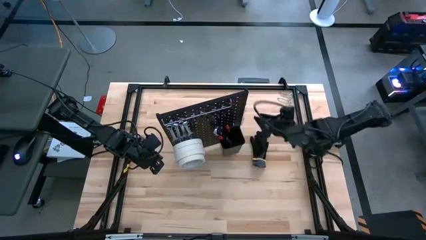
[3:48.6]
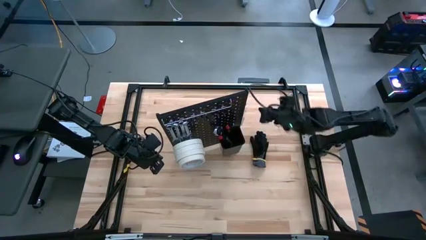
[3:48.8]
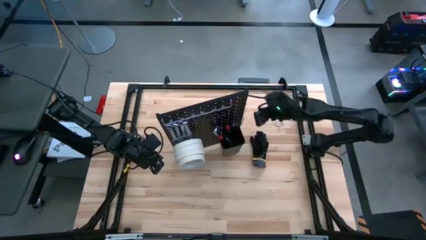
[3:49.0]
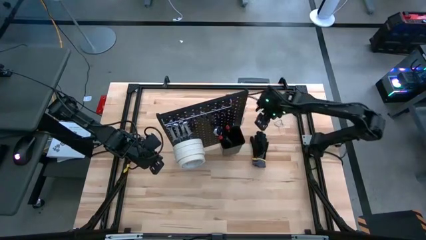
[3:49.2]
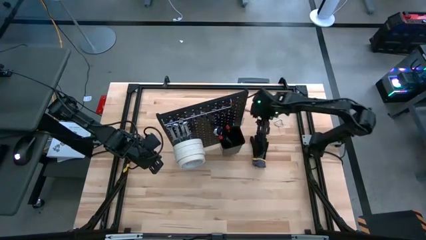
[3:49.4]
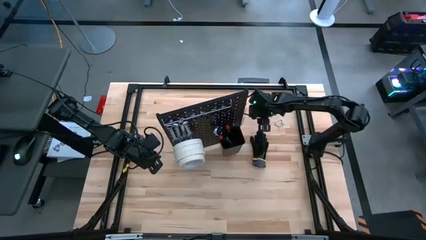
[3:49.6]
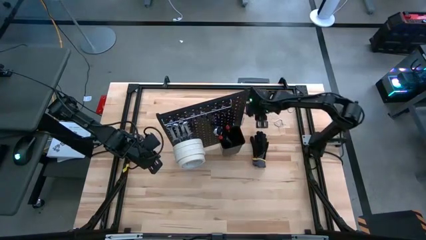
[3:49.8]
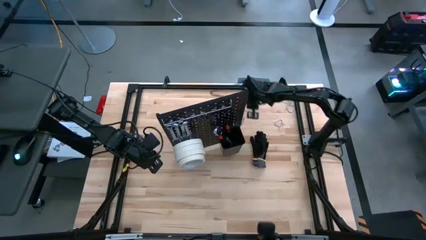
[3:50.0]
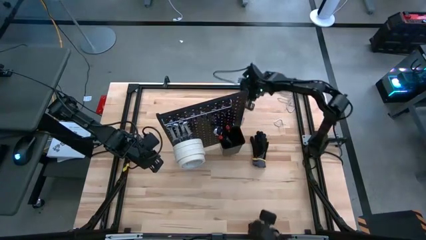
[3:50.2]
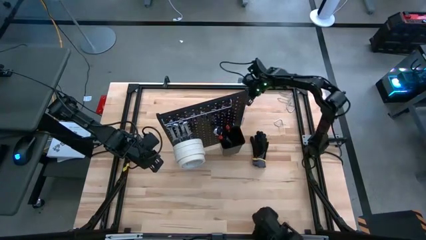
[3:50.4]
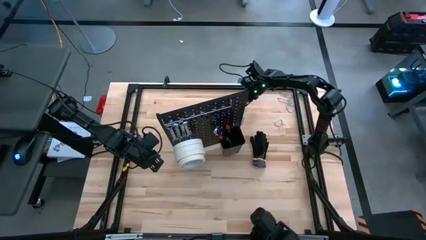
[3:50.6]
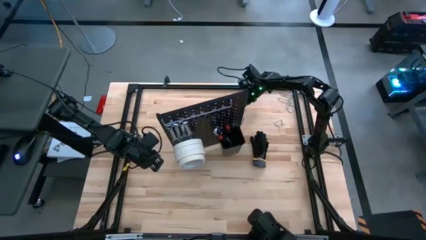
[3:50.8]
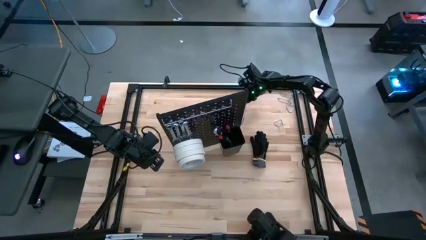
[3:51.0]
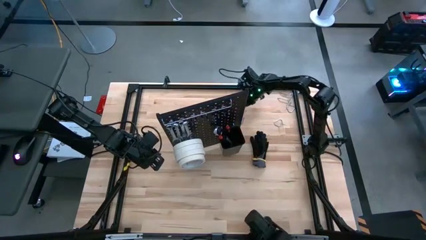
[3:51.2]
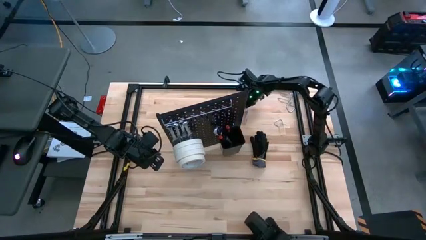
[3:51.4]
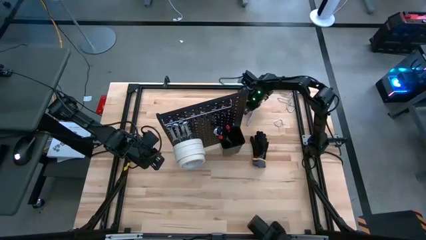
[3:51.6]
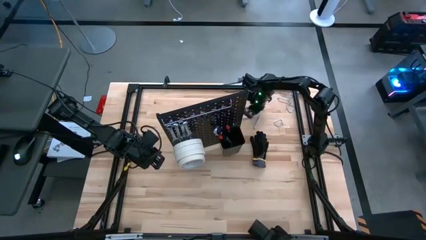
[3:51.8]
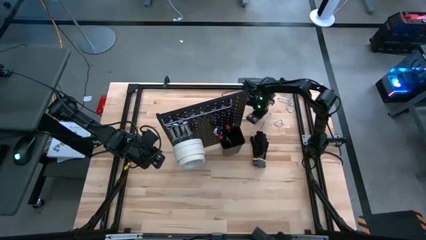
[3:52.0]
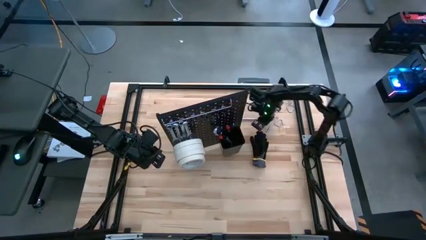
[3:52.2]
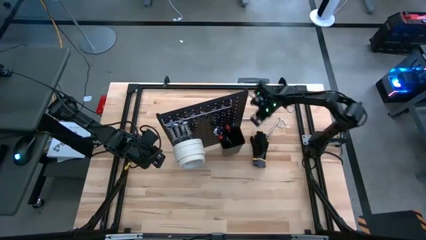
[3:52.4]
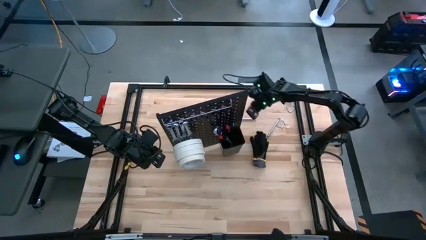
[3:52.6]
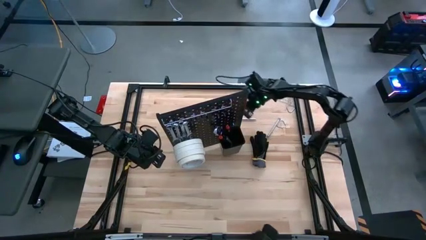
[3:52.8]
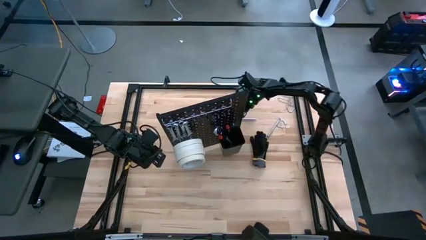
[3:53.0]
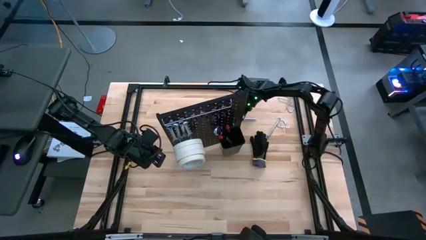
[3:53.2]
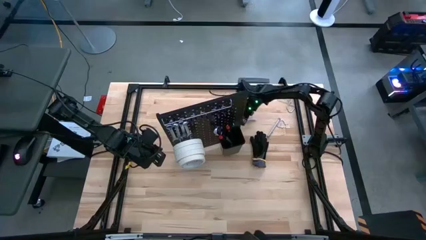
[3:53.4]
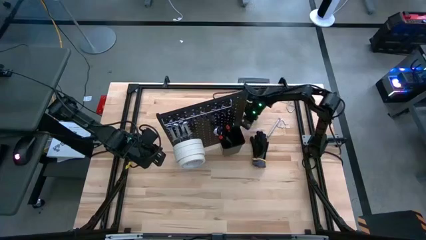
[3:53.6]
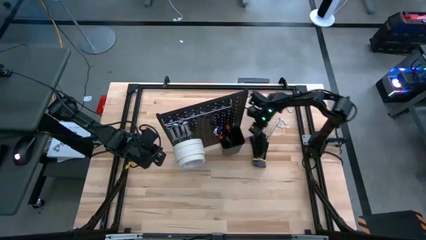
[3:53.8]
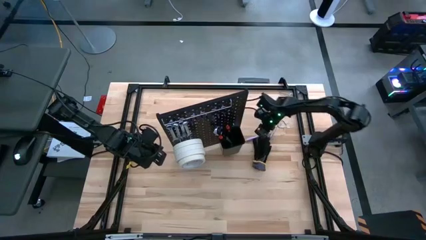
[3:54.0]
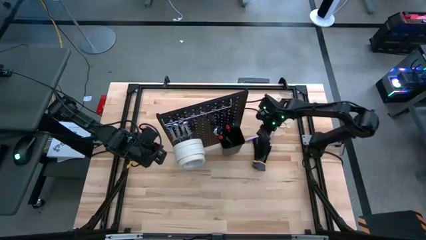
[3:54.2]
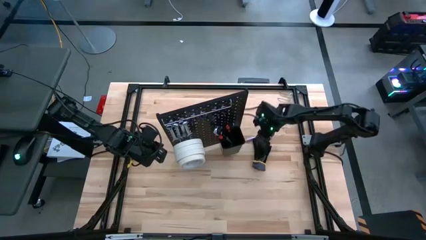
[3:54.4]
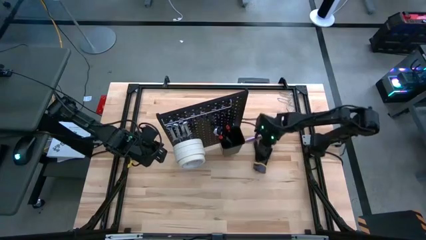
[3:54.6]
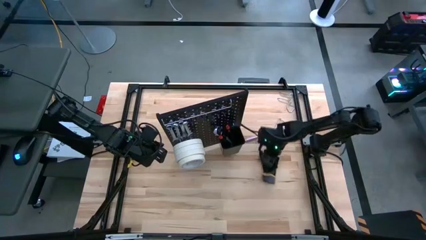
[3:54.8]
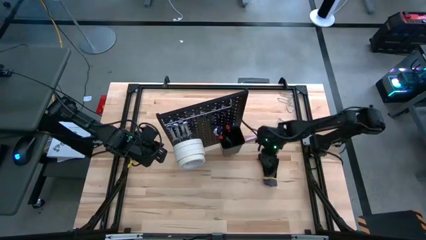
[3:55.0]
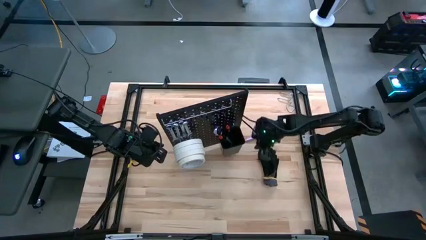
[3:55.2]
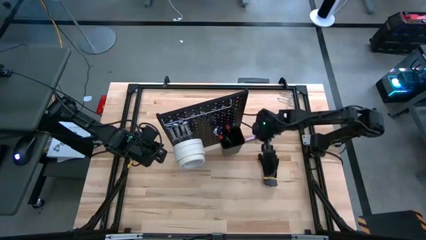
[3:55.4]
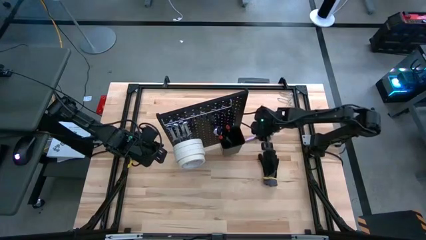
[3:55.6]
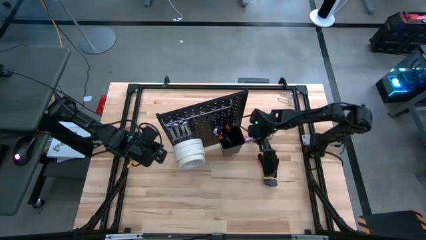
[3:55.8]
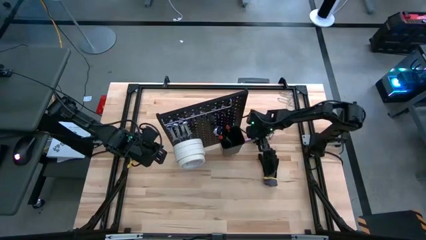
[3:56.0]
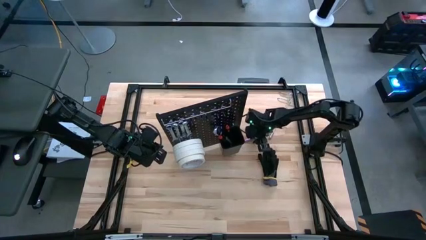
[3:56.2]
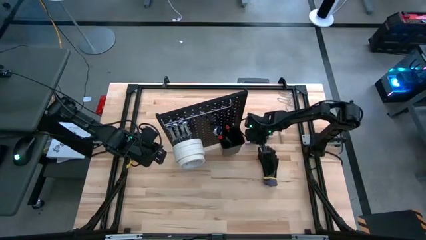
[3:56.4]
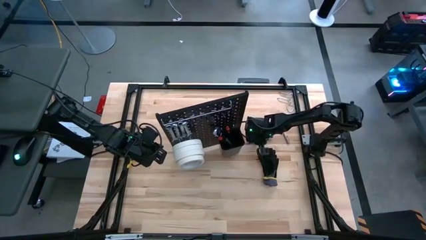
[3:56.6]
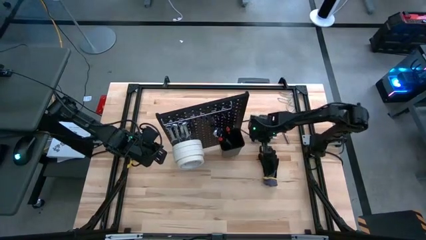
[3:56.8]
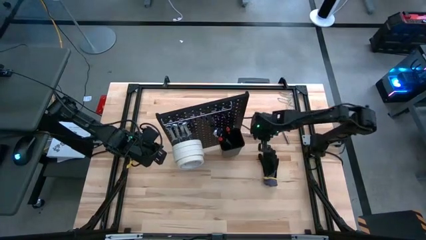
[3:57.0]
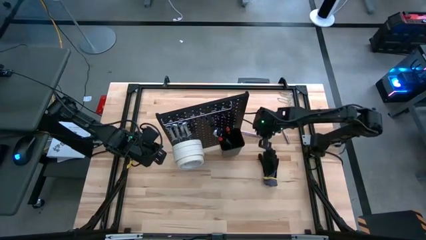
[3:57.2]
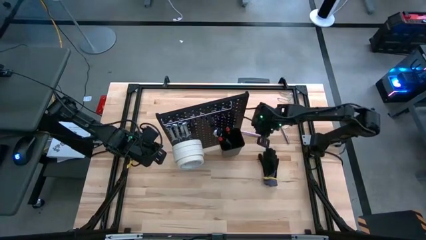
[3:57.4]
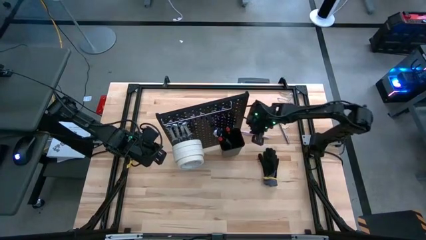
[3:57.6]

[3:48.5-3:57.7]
Task: Hang tools onto peg board
Hang the light purple pen onto the pegboard

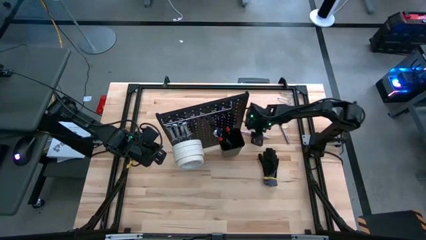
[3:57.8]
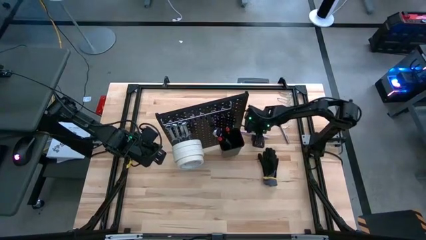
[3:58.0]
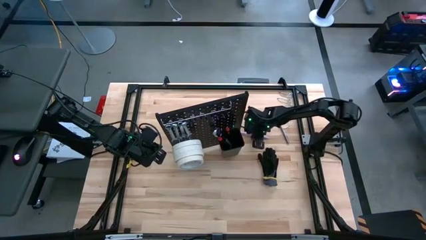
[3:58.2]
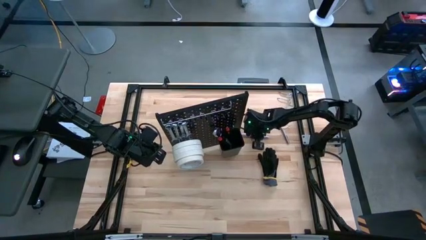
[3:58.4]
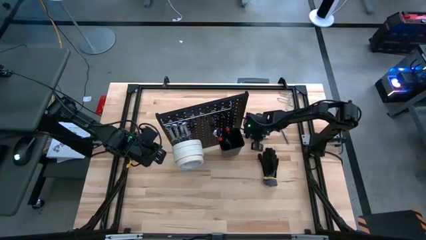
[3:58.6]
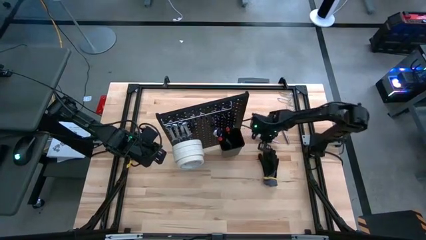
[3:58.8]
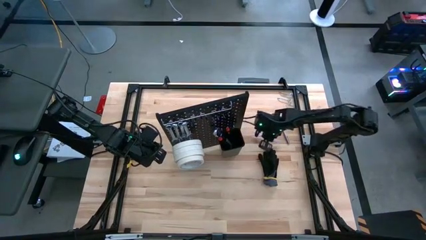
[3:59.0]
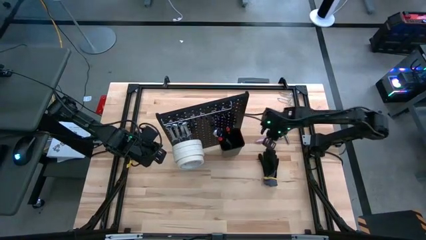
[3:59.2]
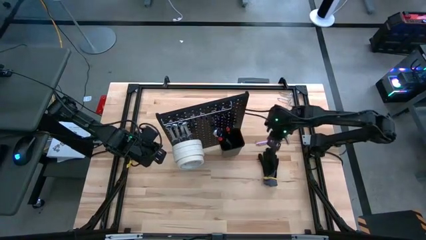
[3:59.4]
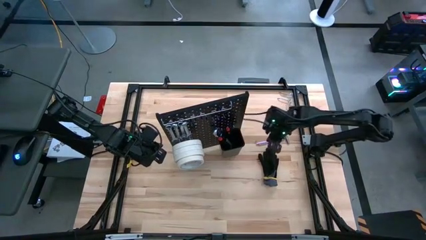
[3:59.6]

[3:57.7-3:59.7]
Hang the light purple pen onto the pegboard

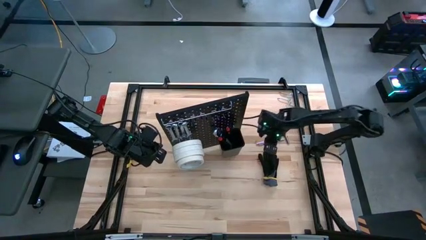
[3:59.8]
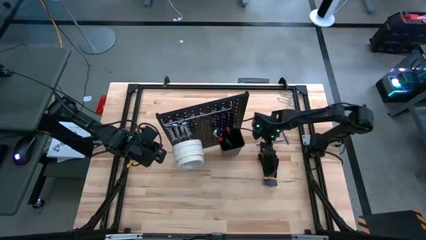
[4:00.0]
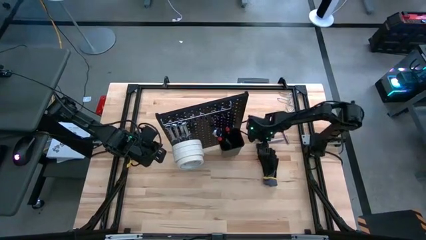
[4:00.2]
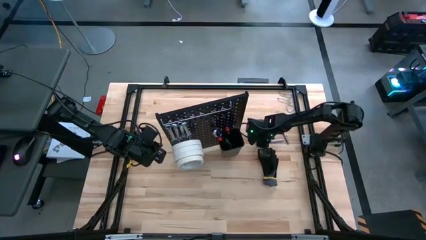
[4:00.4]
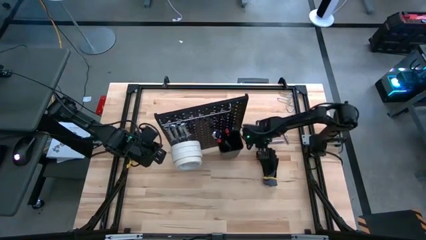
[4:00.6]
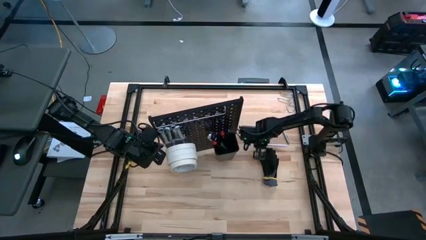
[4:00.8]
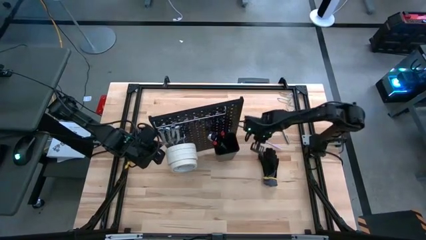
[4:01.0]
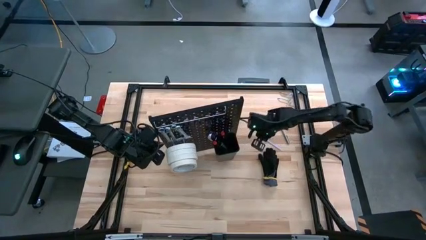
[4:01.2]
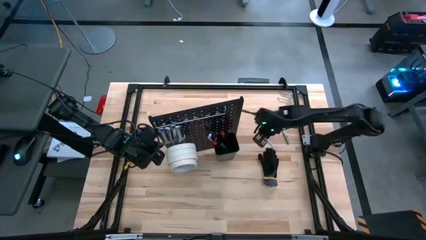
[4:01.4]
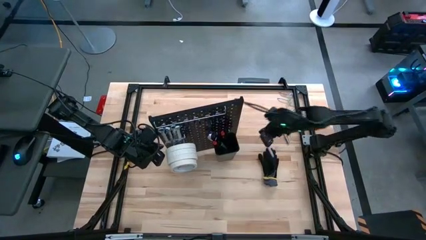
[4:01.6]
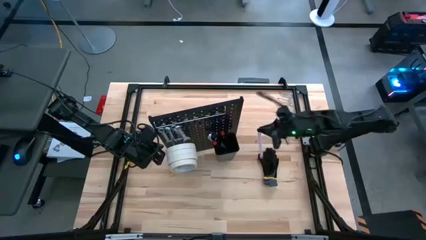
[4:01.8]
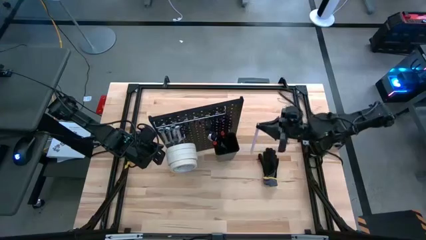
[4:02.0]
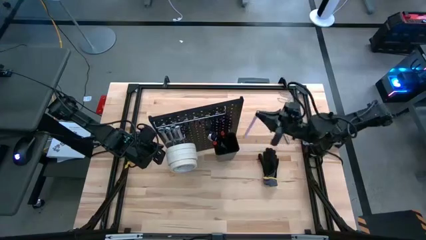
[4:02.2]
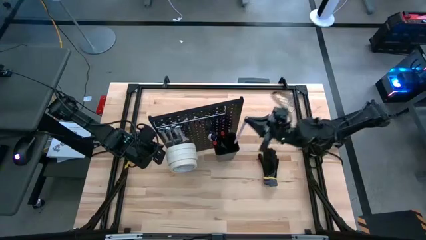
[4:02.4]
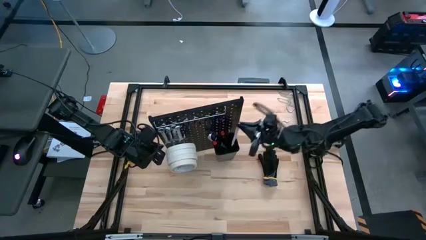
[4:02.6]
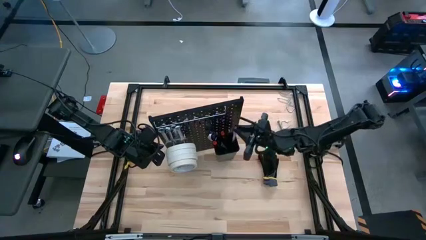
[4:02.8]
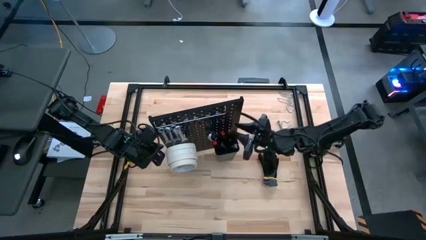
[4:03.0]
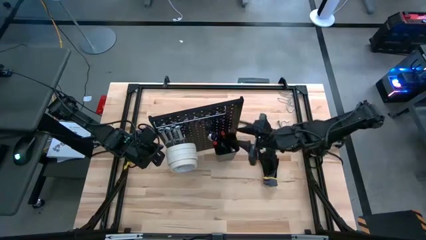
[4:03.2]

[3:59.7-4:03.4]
Hang the light purple pen onto the pegboard

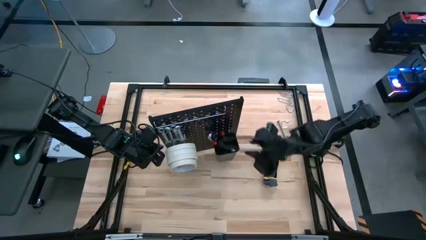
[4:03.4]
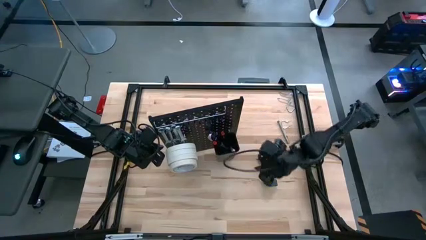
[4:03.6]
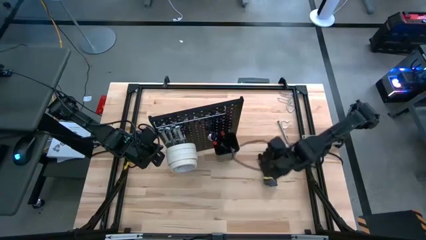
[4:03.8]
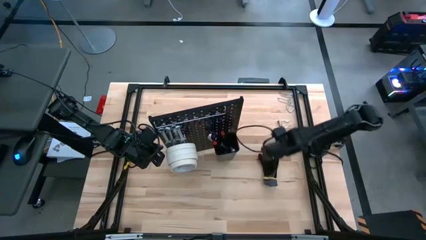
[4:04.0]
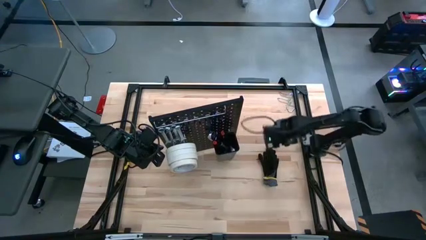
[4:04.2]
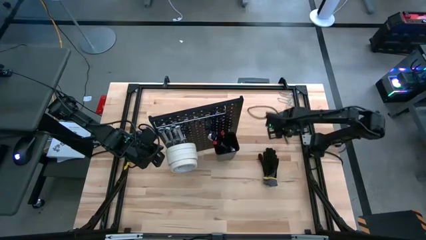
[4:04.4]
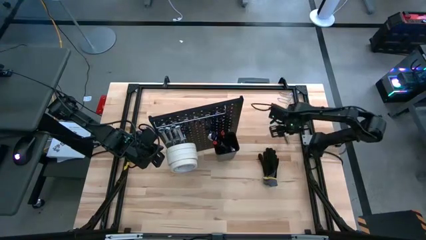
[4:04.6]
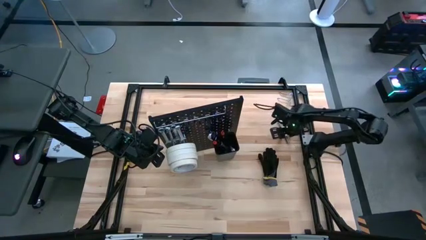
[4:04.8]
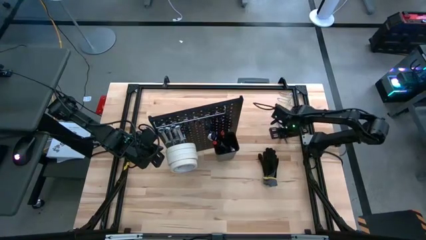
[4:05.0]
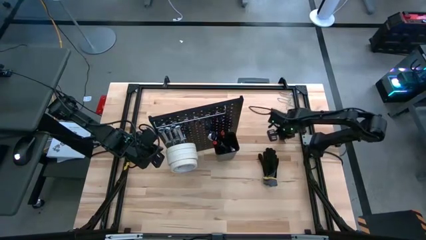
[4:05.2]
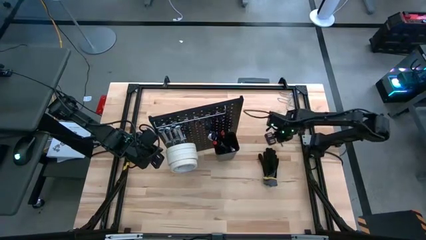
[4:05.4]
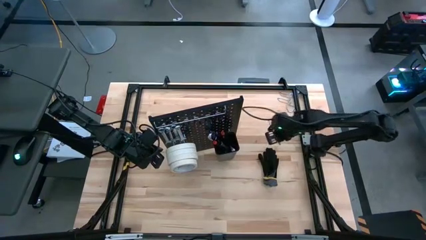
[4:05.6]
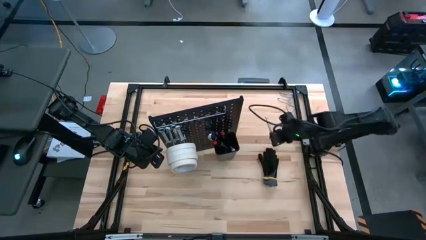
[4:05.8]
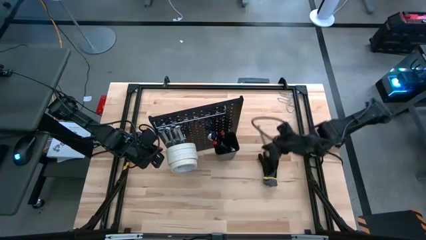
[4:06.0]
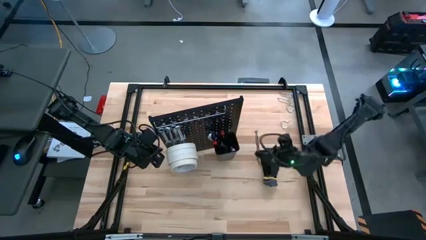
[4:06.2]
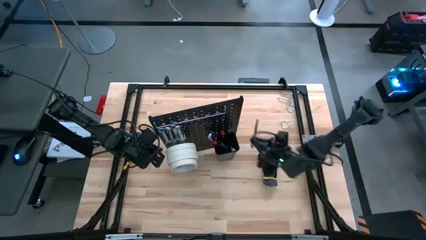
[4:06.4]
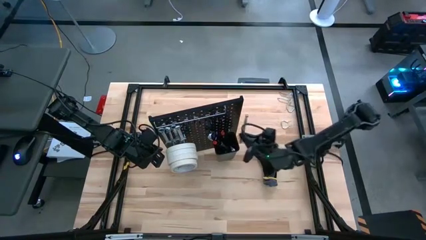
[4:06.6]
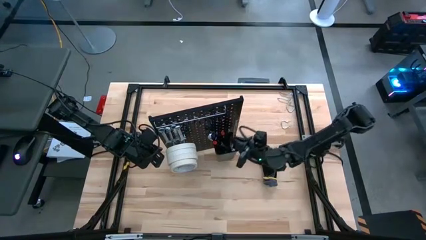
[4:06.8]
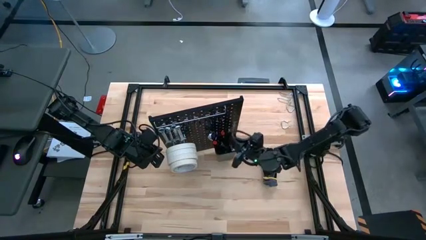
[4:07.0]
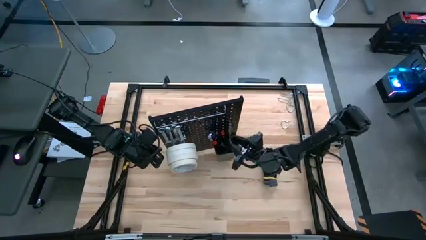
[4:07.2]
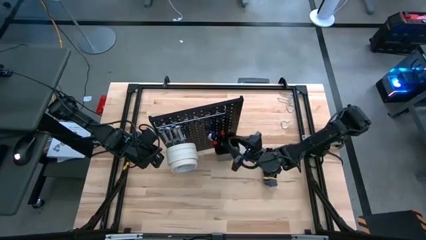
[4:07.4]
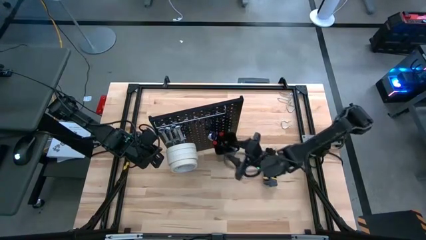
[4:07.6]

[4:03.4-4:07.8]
Hang the metal stick tool onto the pegboard
